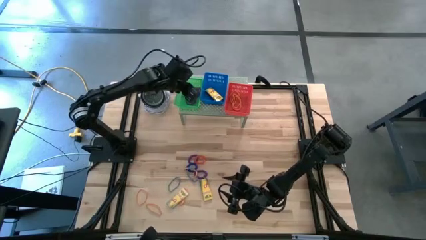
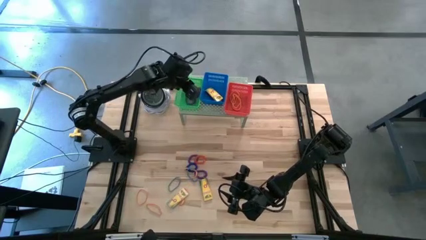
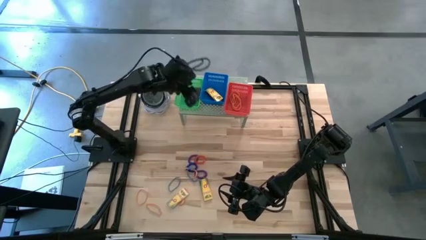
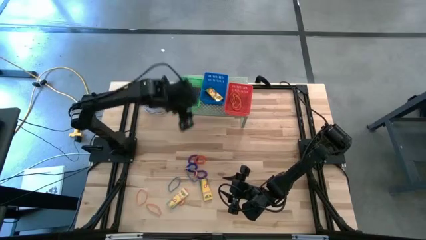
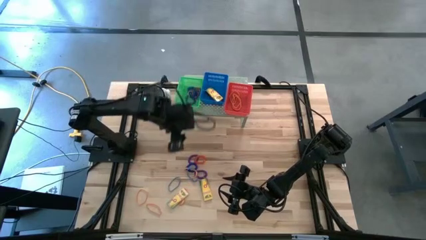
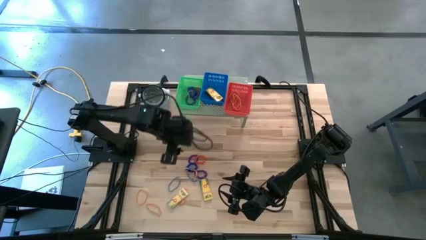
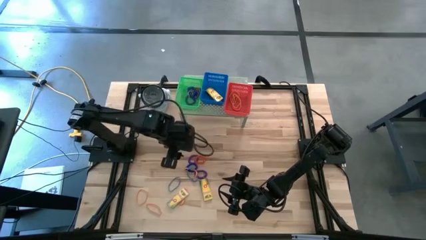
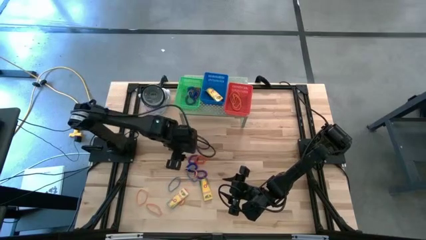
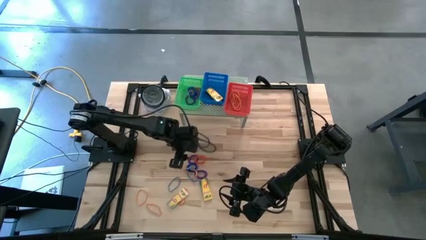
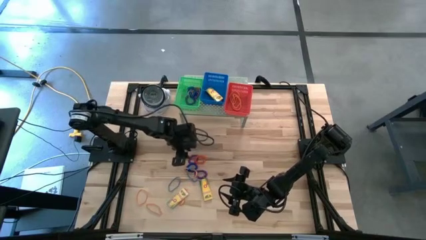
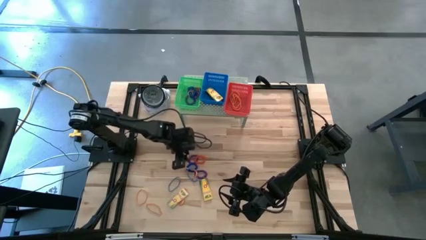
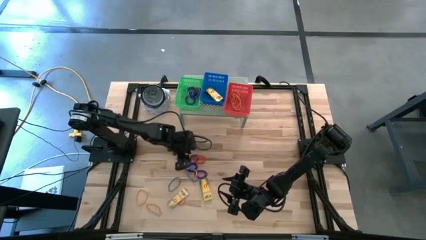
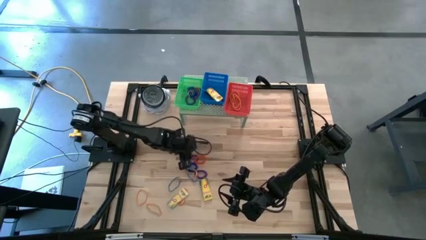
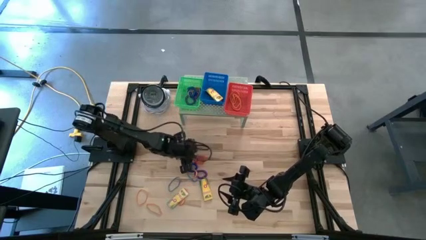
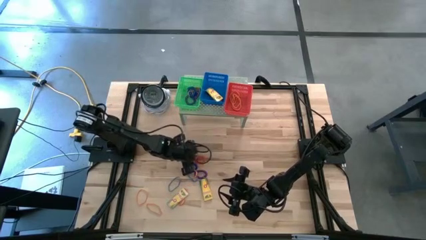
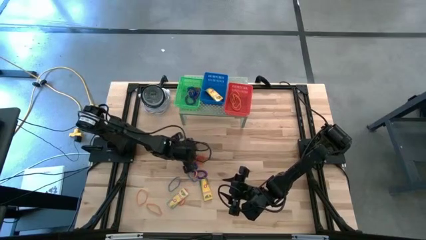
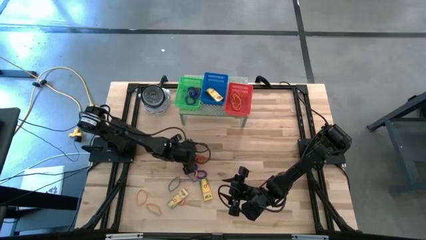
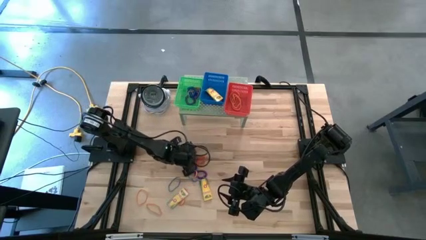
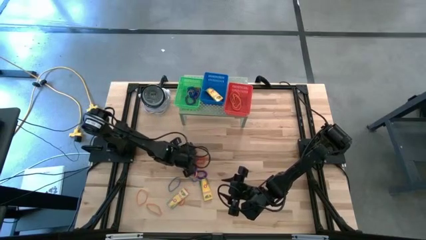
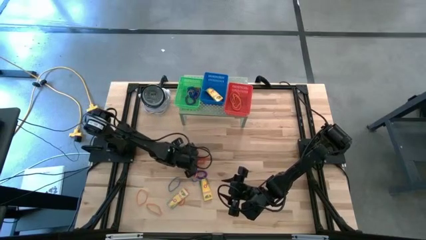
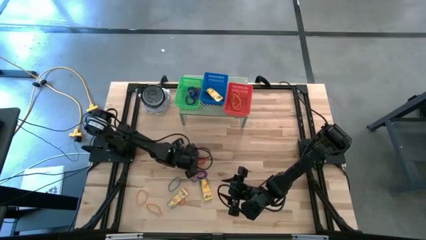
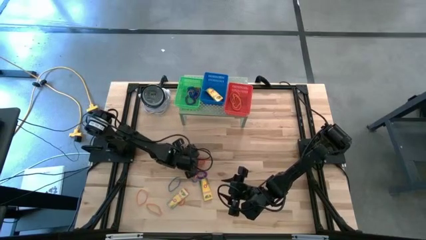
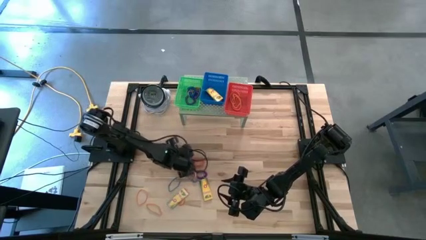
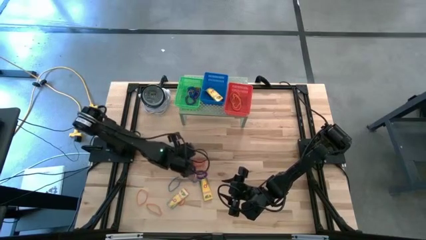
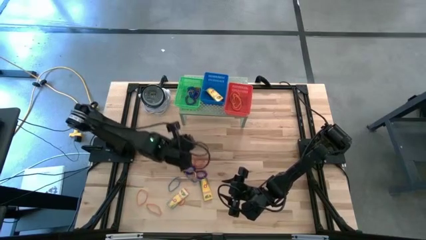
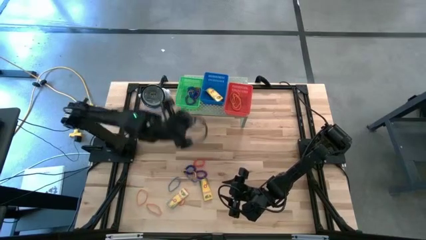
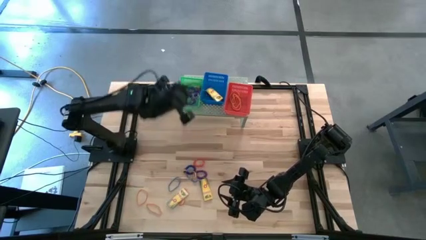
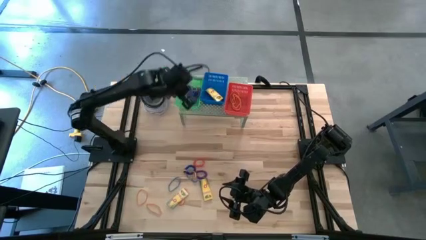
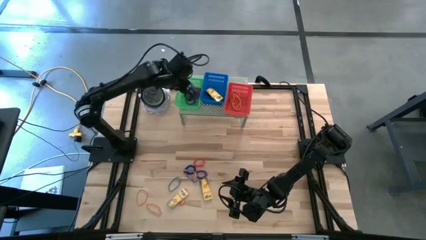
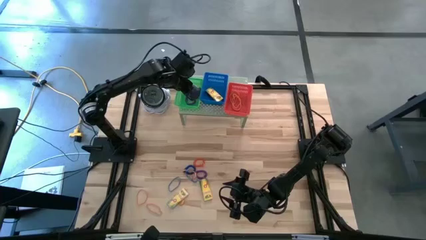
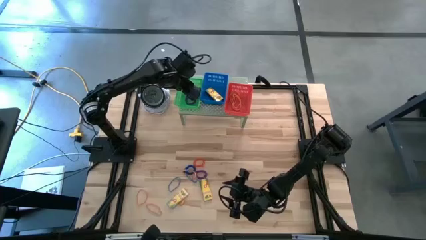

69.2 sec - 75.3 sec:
Task: Pick & Place Office Desk Supplies
Put the violet spring keychain into green bin on the shelf

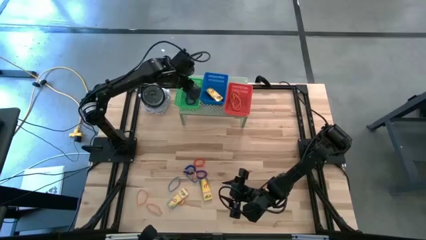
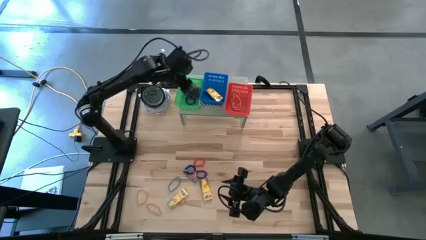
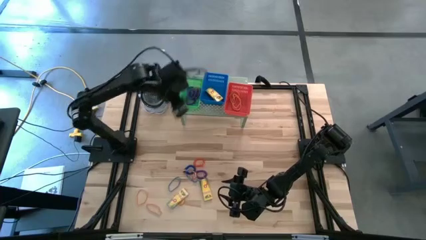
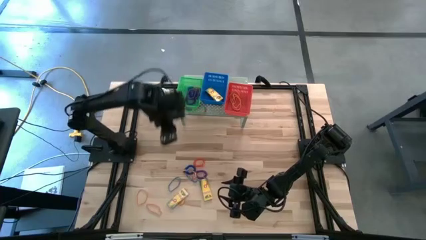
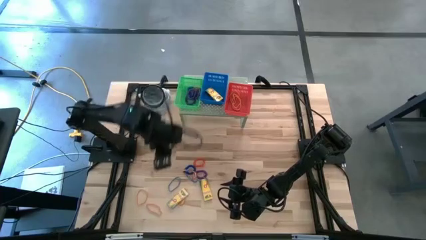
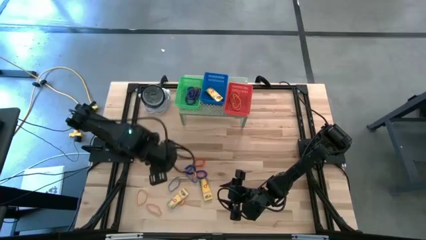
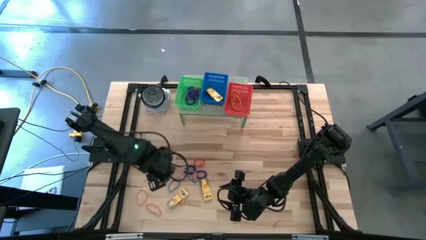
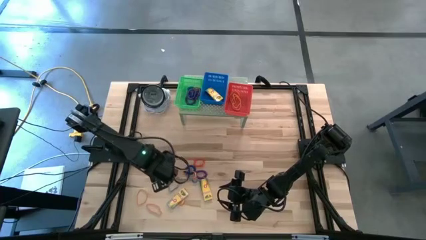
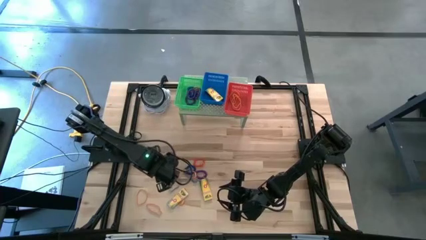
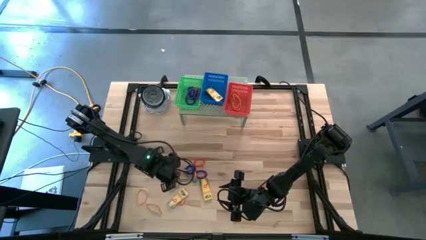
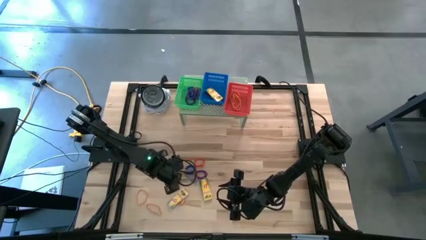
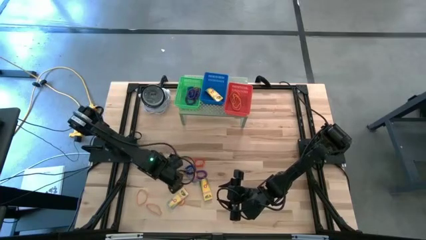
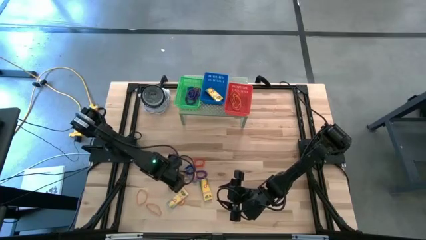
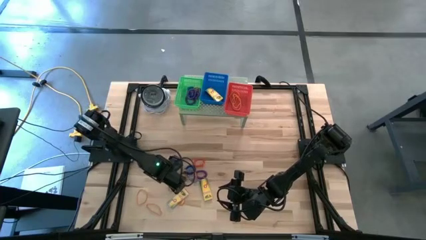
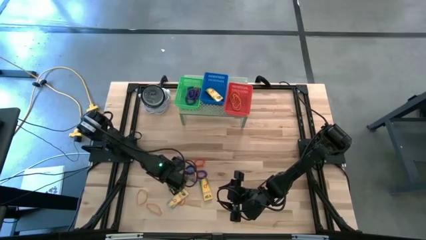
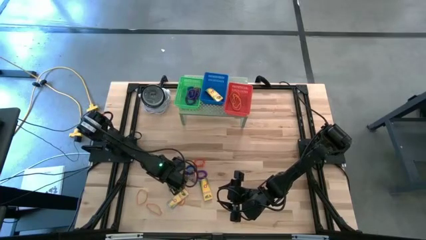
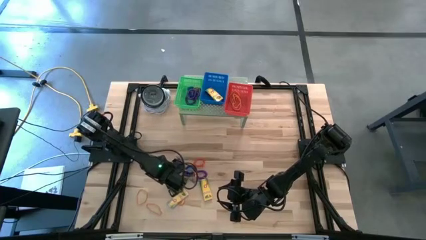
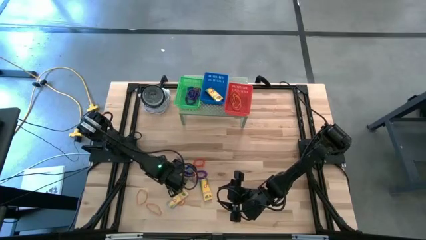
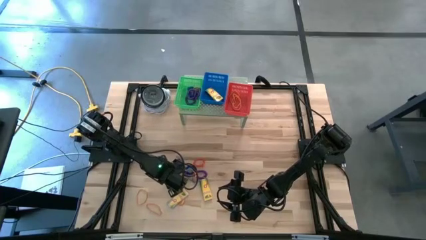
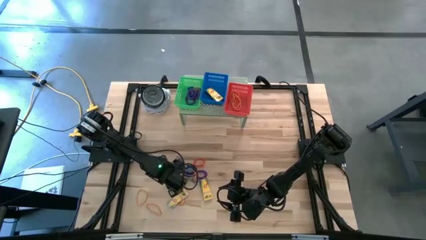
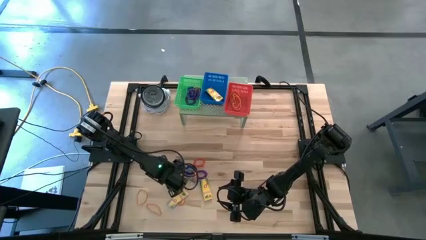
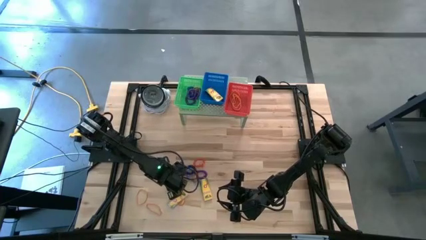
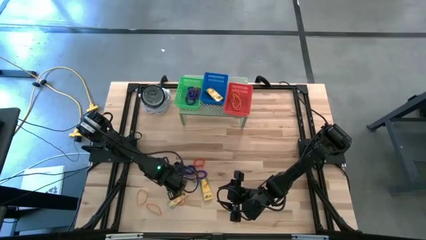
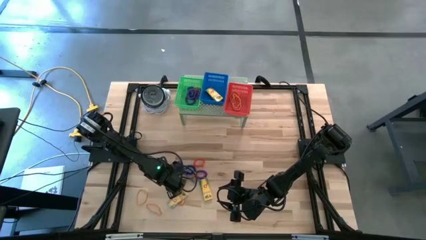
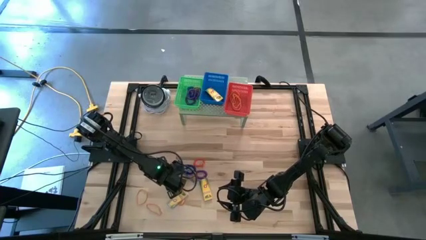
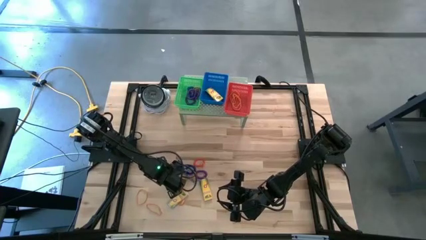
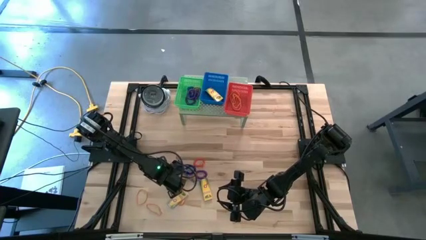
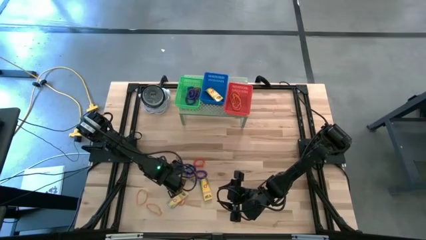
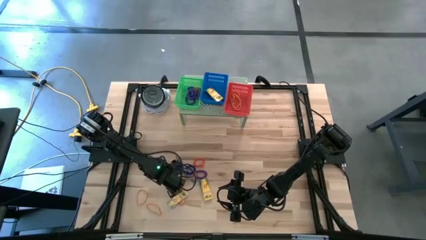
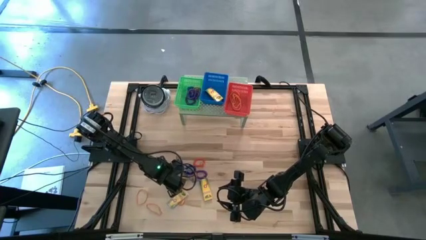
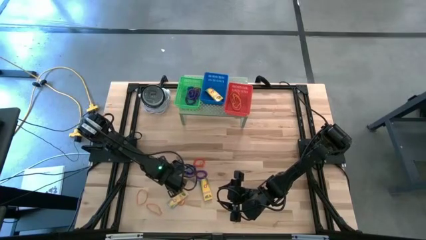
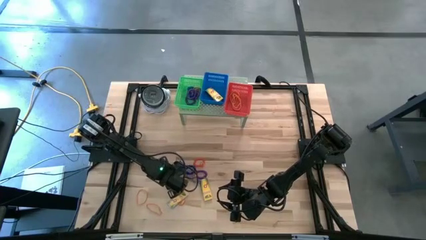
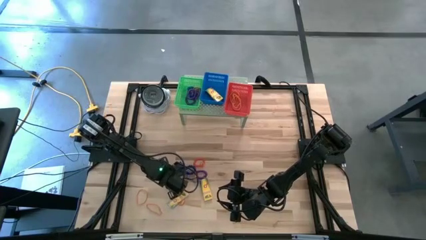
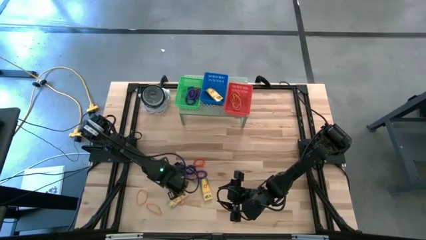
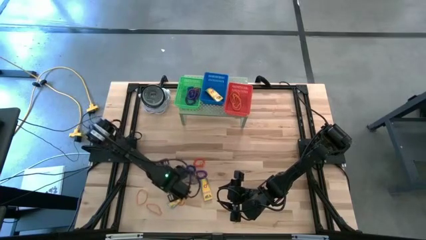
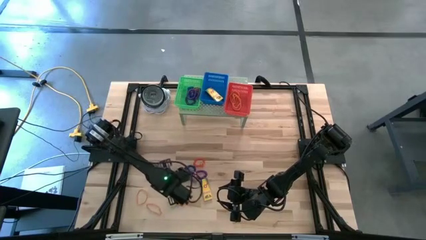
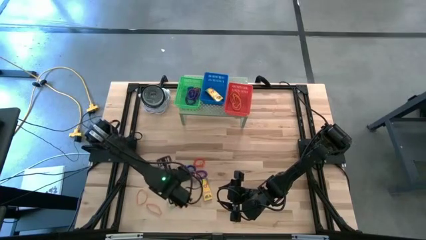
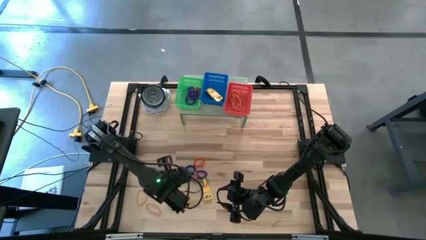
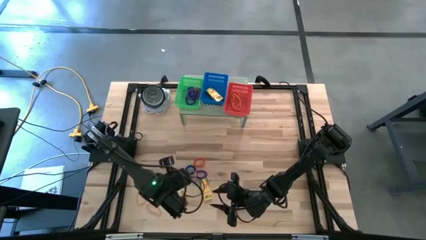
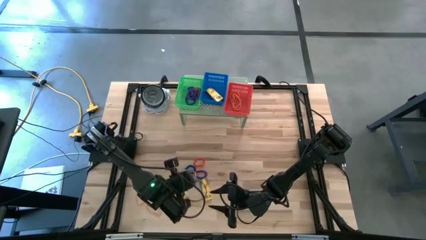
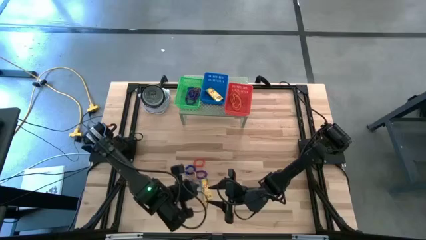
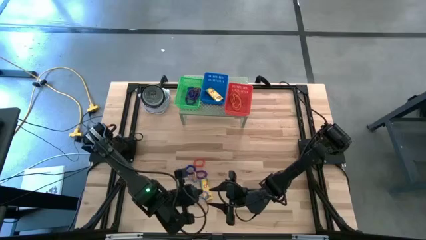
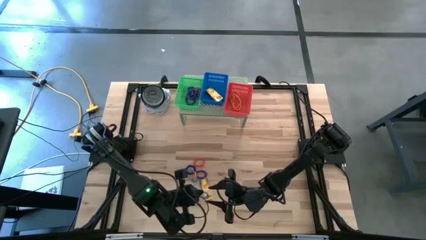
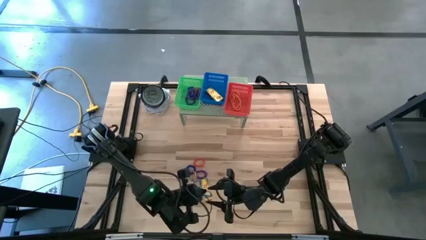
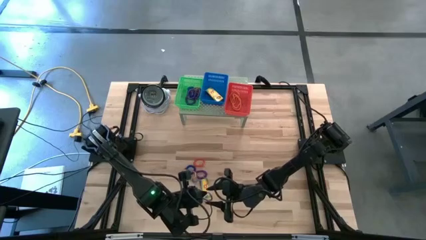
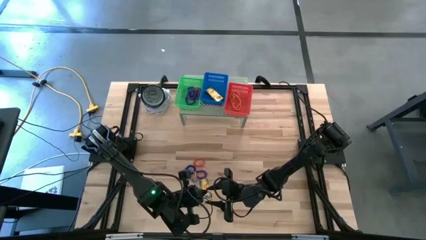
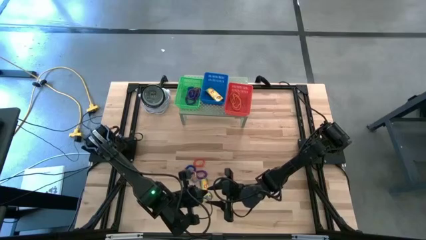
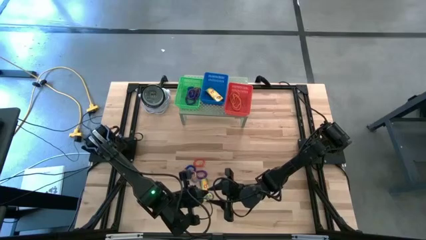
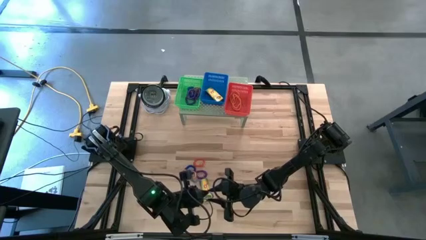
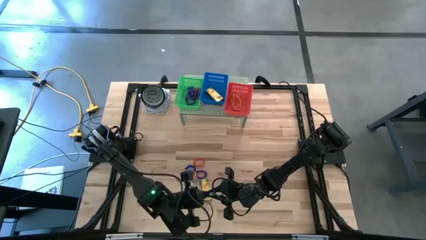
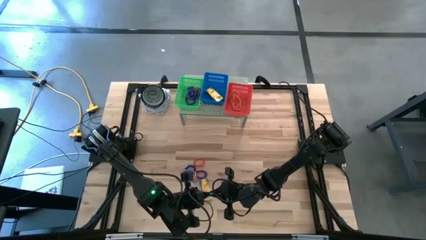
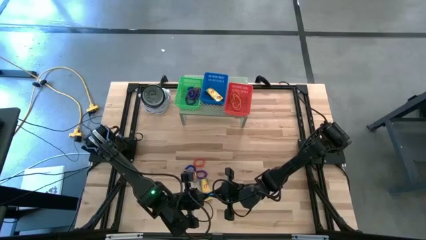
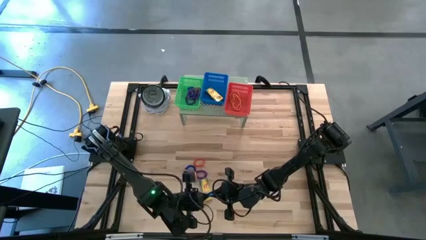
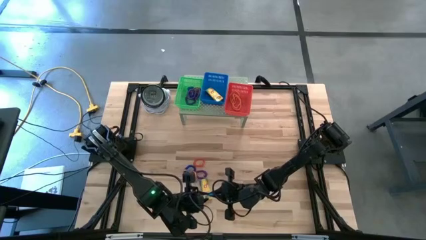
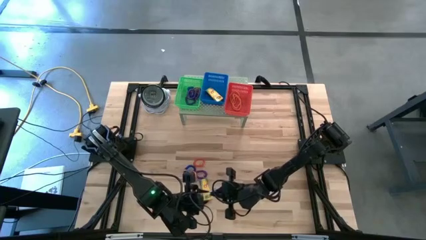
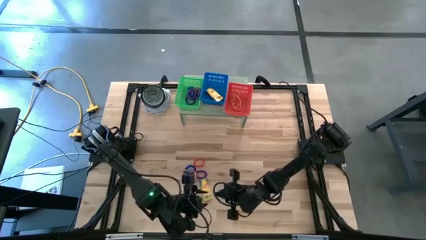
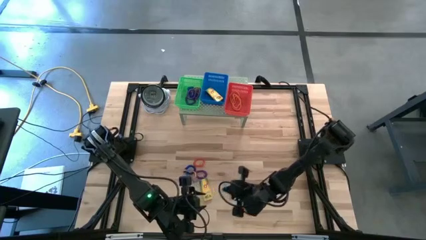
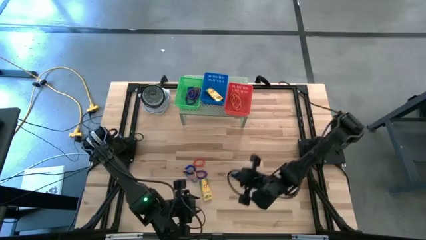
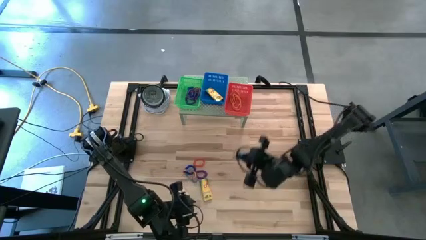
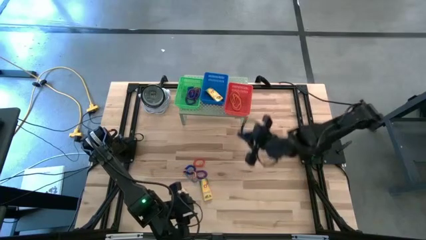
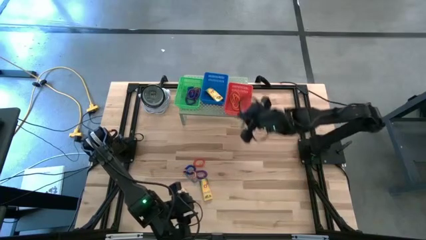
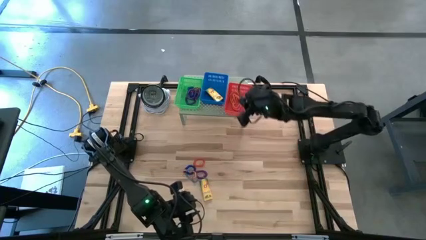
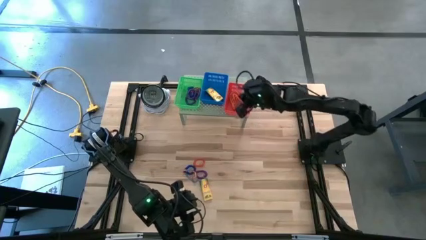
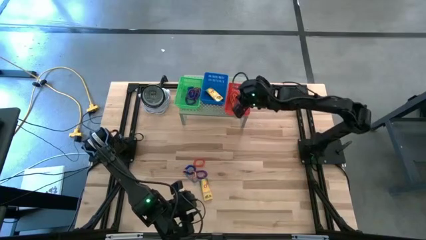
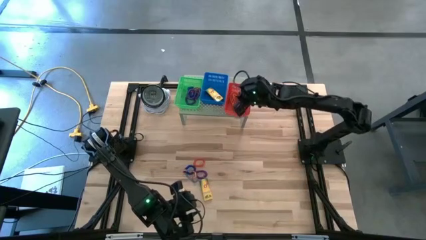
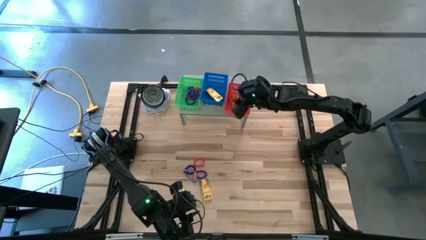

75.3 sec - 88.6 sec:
Put the blue rubber band into the red bin on the shelf
